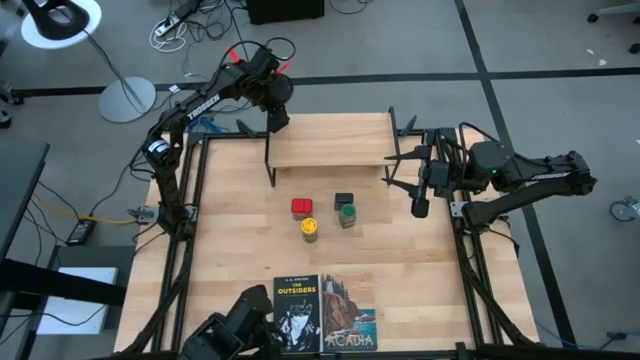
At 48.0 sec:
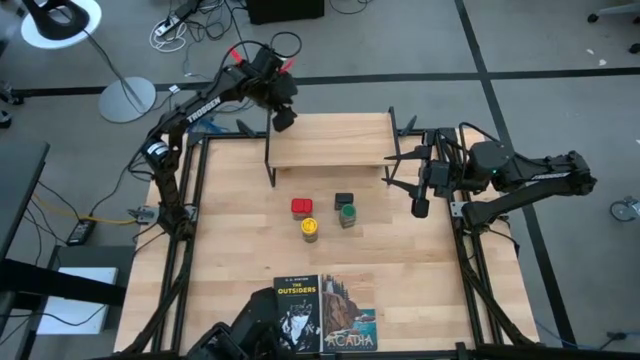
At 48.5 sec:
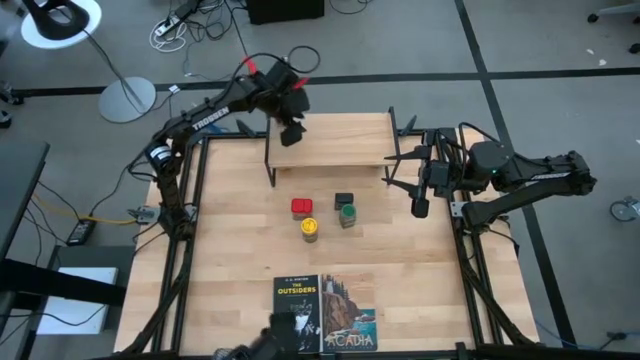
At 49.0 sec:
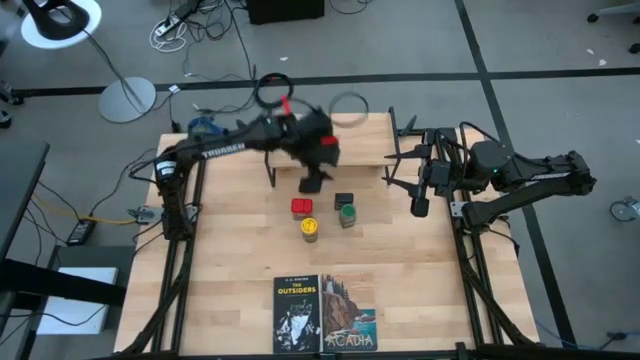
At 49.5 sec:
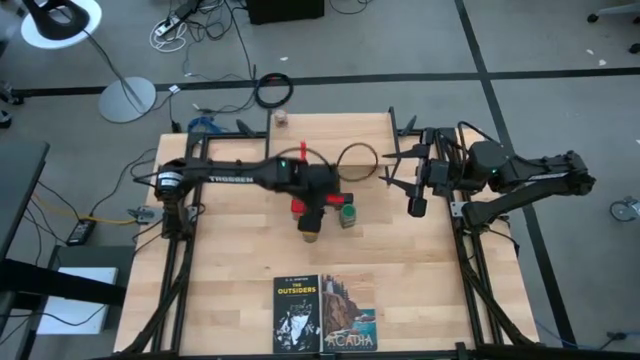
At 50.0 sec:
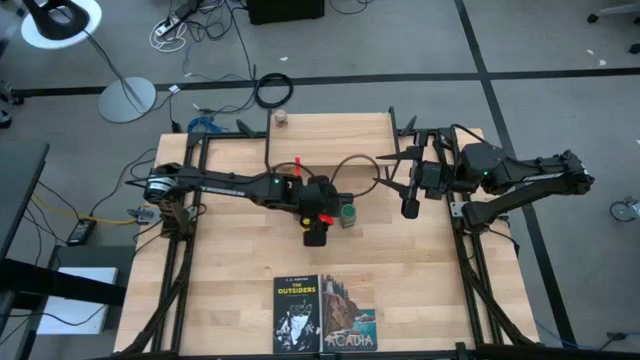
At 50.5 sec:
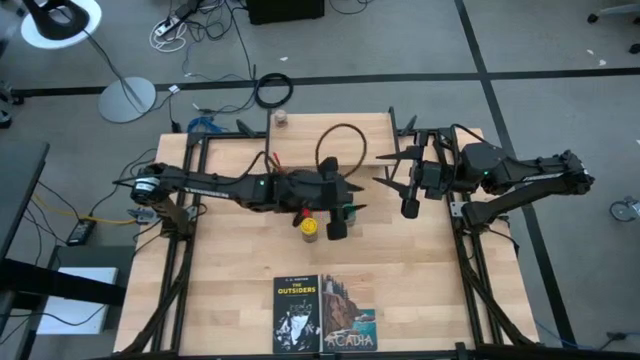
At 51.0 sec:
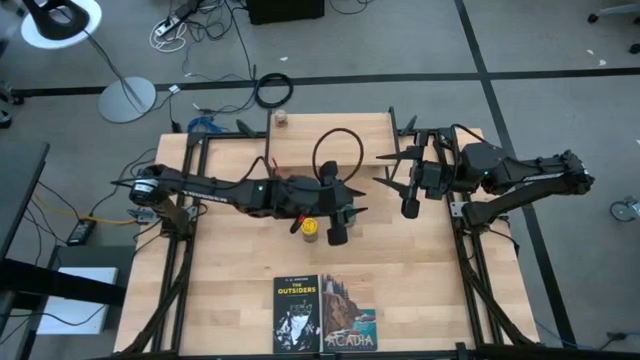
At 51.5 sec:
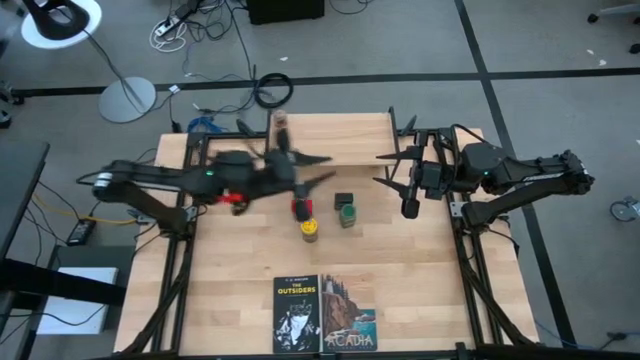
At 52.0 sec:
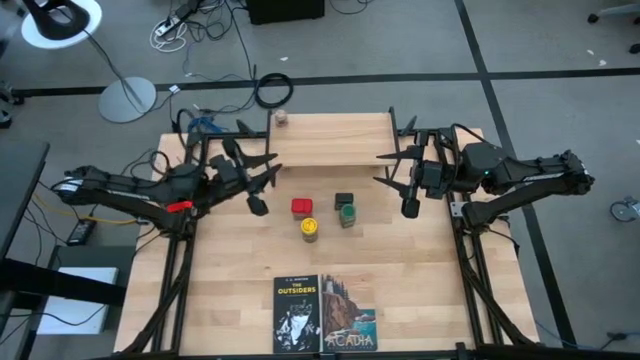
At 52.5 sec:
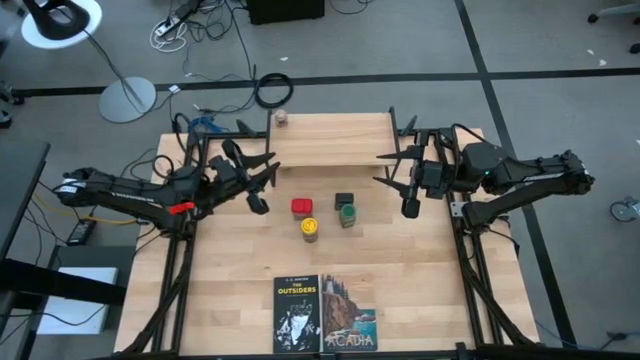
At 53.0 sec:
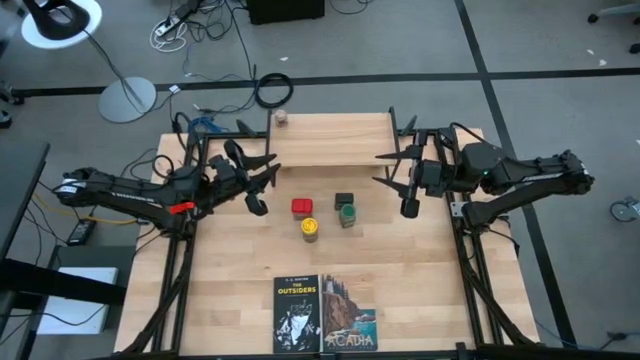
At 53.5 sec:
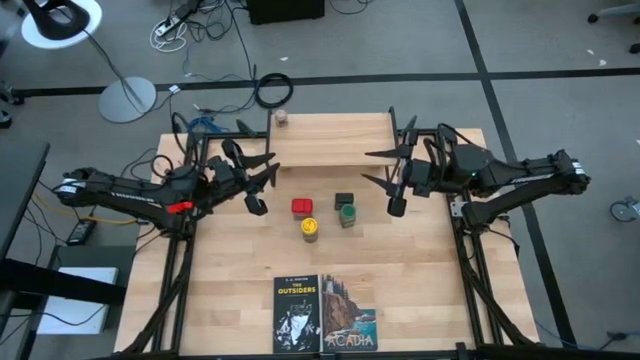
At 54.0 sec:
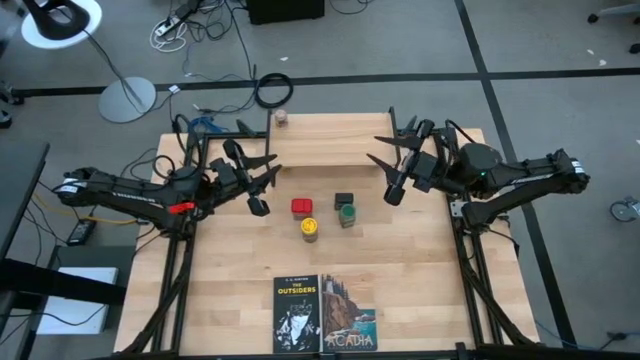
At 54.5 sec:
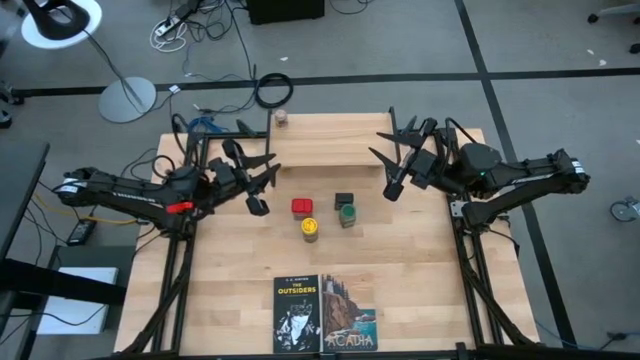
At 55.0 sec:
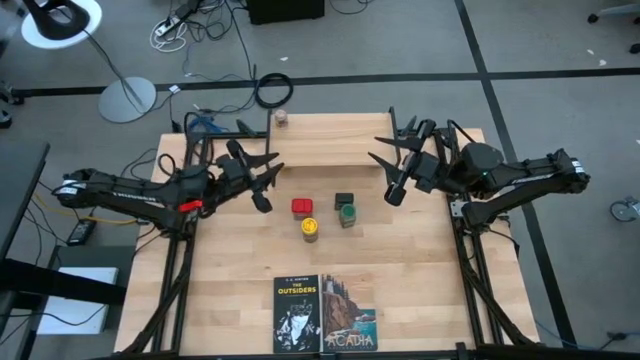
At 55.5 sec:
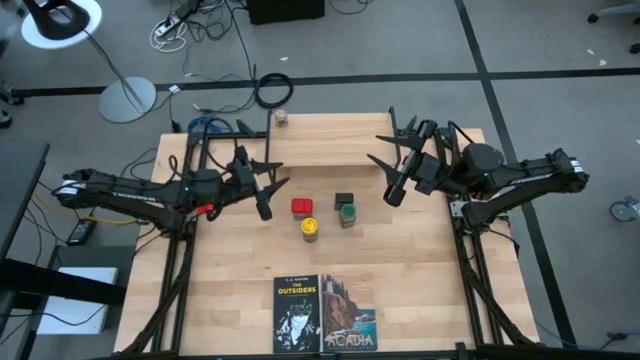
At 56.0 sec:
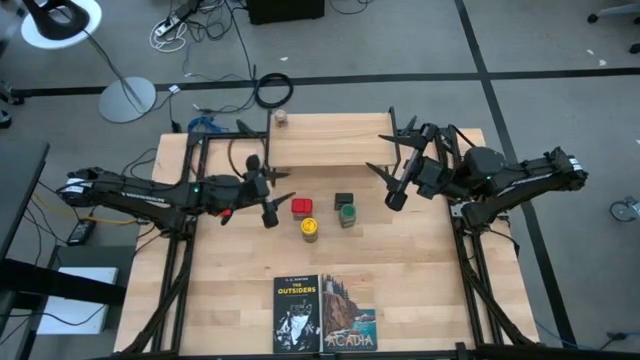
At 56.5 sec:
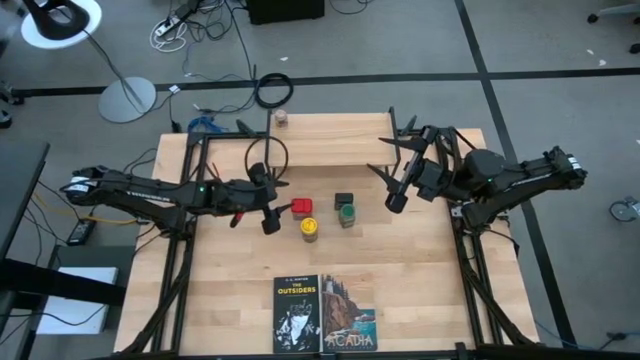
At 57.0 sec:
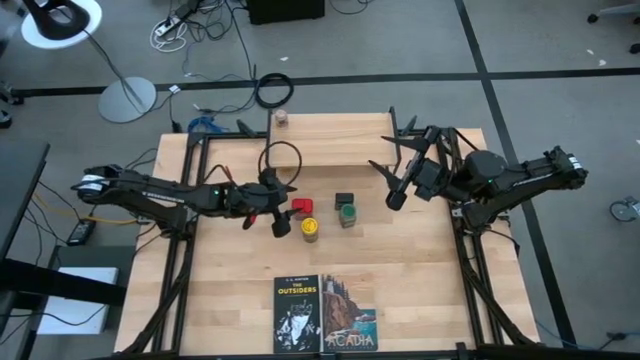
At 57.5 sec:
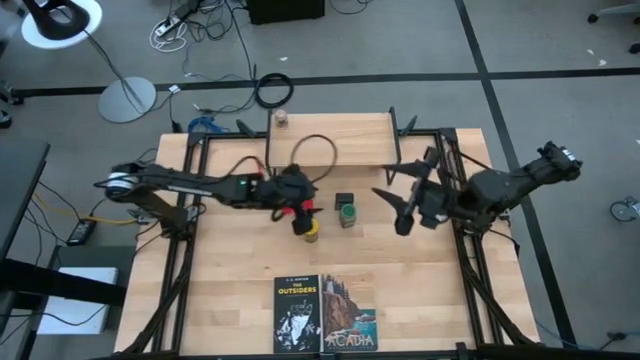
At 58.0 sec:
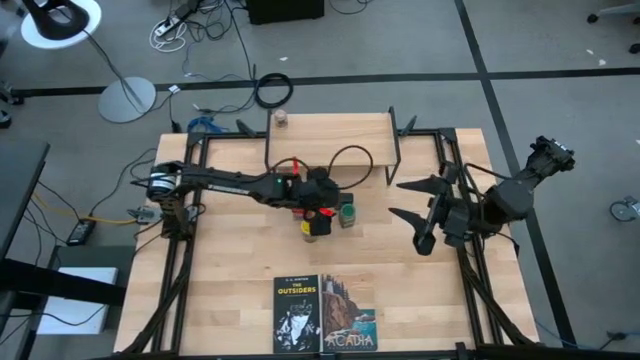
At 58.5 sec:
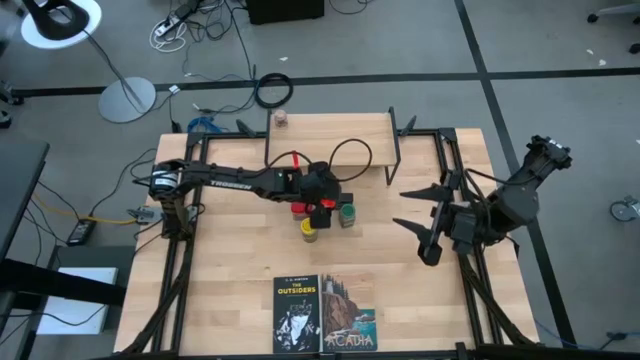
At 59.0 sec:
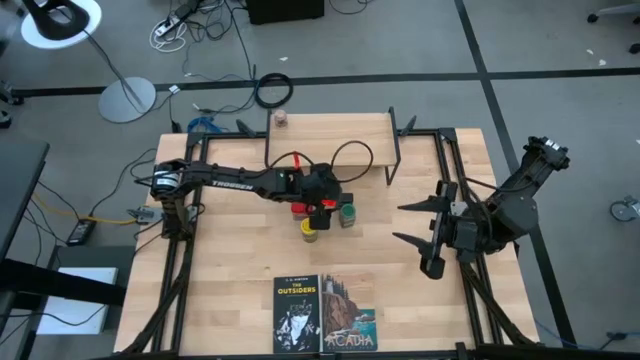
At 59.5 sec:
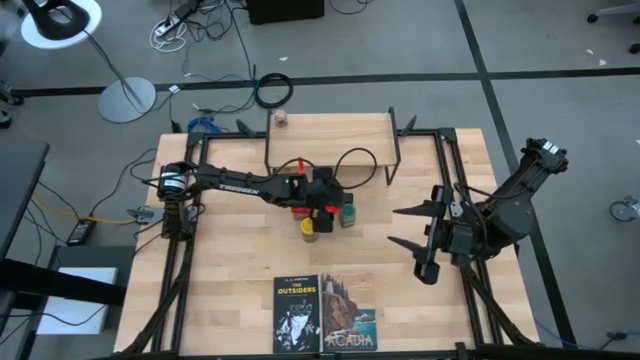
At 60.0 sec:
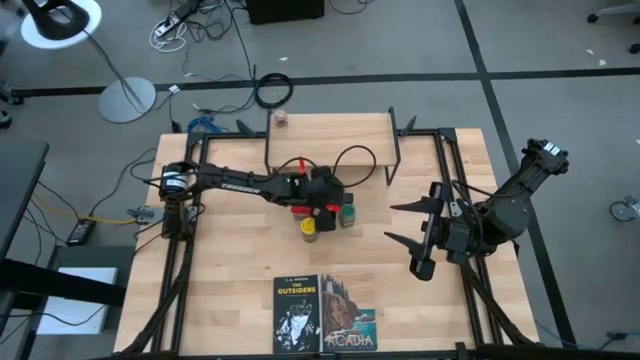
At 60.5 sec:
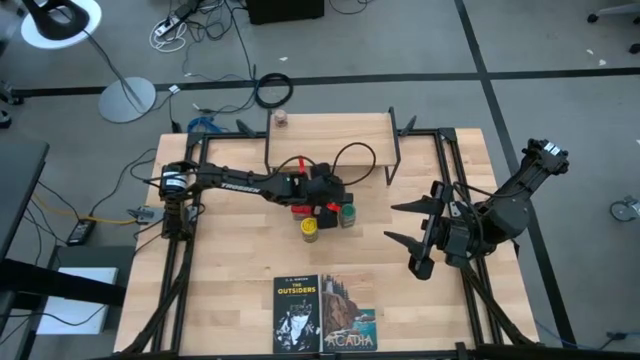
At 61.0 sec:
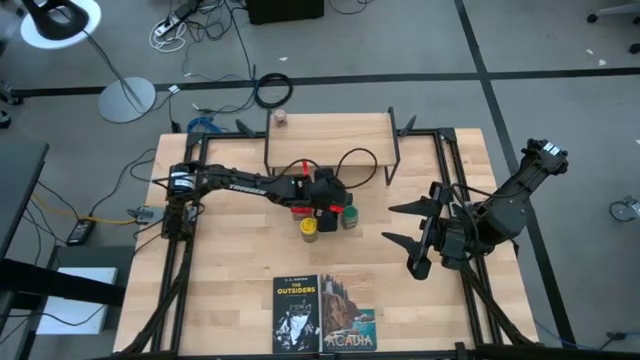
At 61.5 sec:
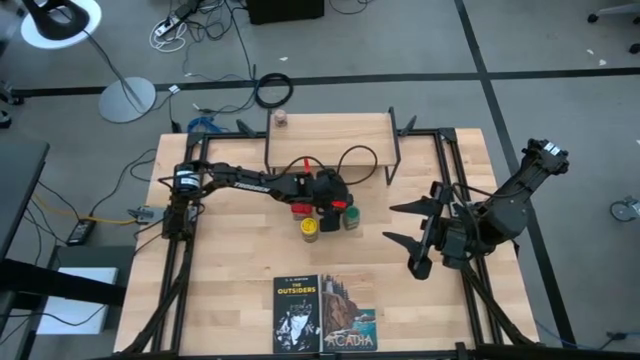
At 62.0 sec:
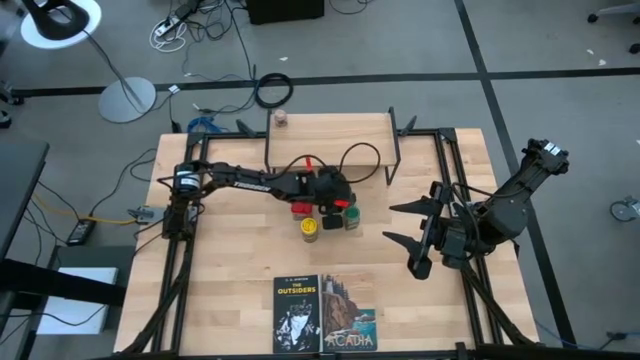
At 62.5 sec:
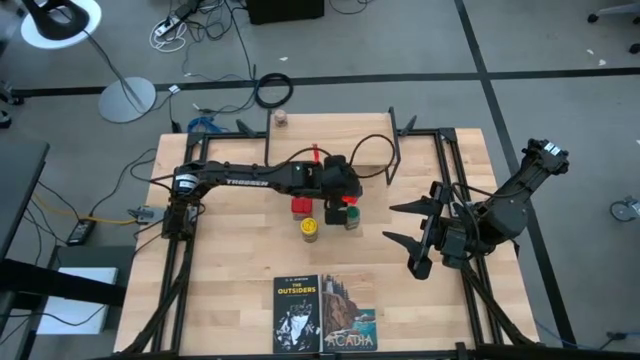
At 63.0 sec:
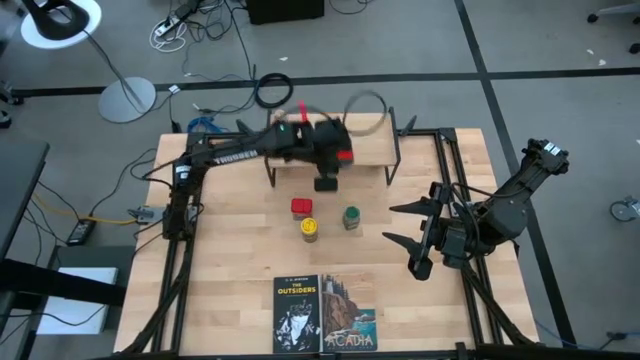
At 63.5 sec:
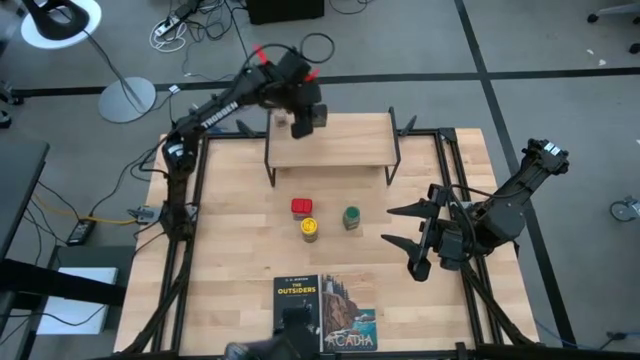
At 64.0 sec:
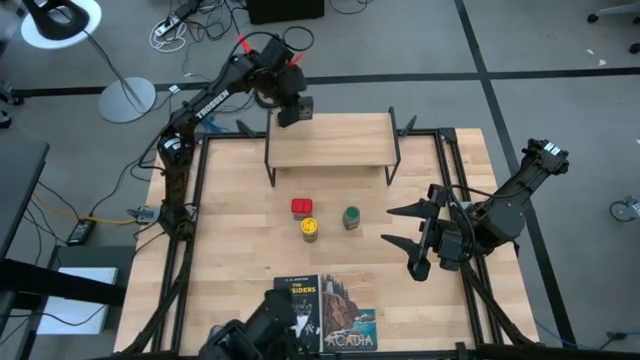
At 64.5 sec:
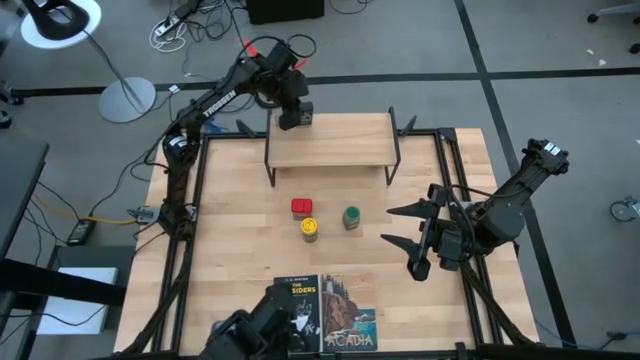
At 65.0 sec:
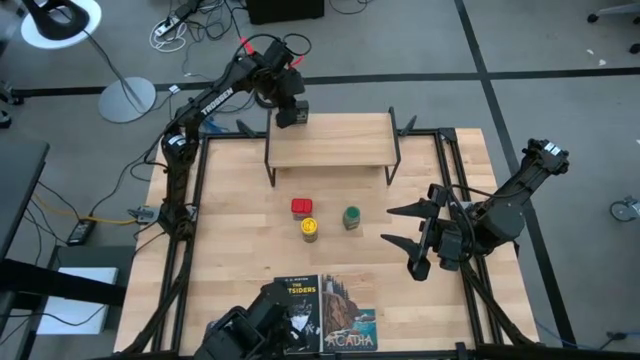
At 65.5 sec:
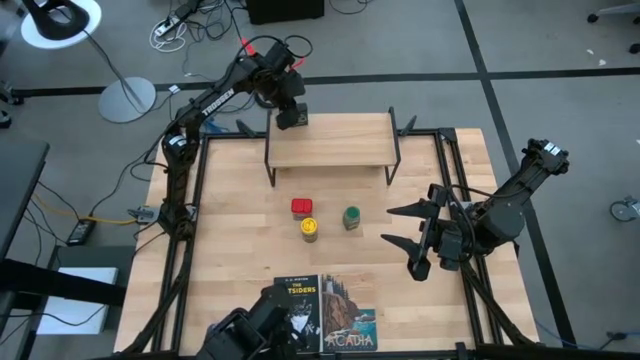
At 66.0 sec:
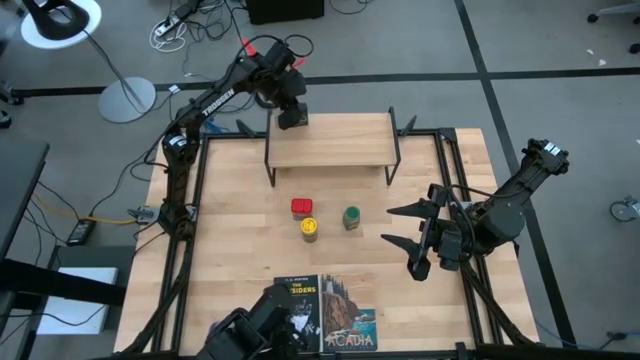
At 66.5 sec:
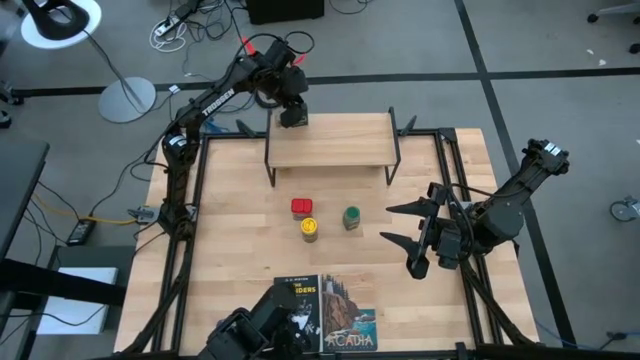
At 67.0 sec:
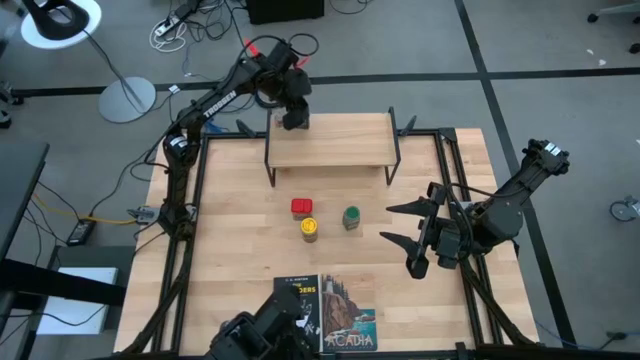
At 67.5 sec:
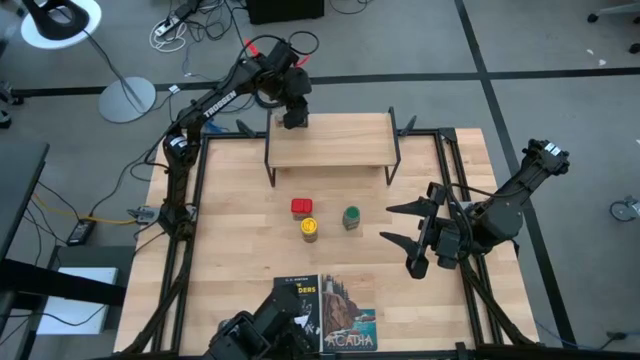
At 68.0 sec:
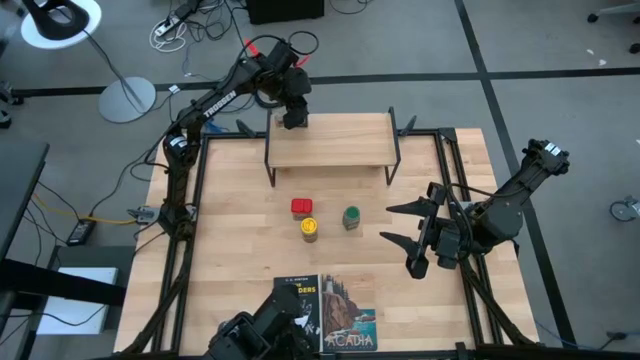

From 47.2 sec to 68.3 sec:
Task: Shelf spices
Put the black seasoning can on the shelf
